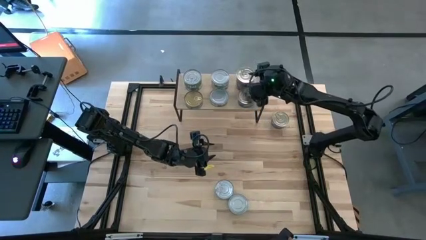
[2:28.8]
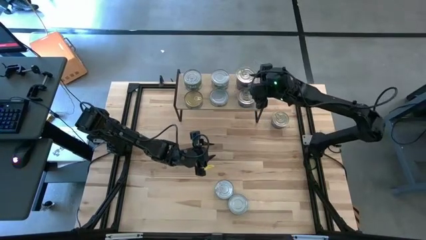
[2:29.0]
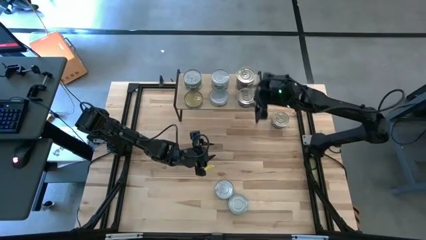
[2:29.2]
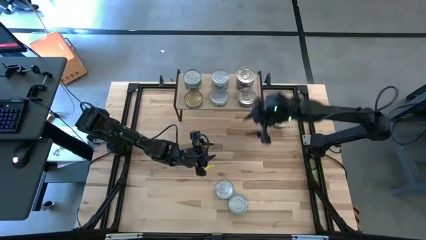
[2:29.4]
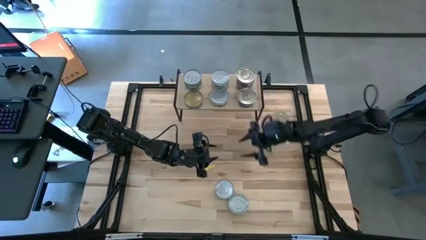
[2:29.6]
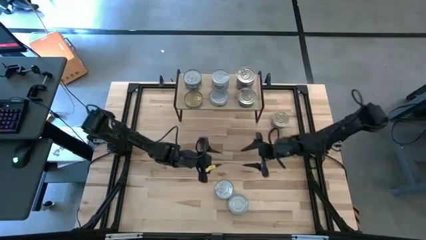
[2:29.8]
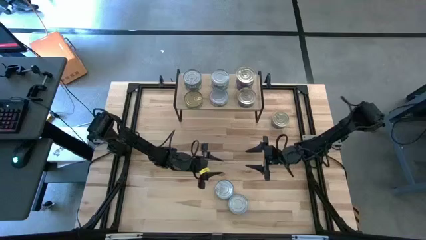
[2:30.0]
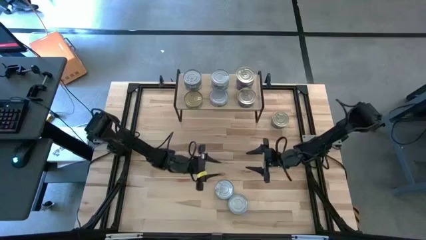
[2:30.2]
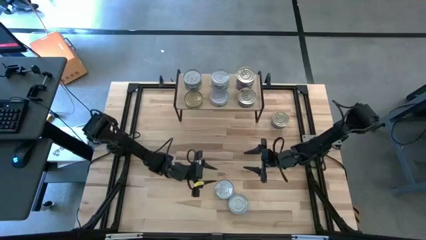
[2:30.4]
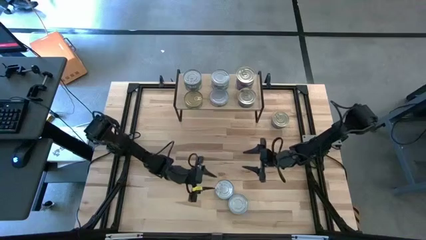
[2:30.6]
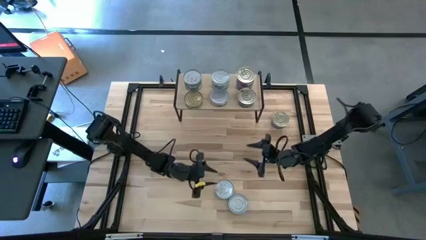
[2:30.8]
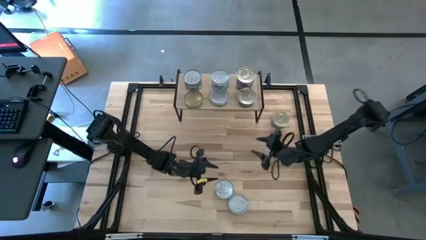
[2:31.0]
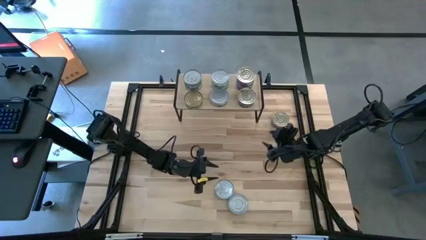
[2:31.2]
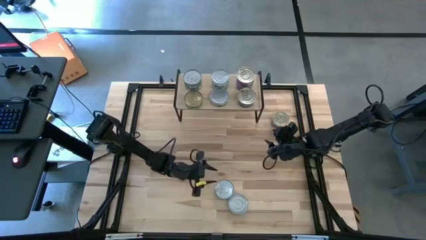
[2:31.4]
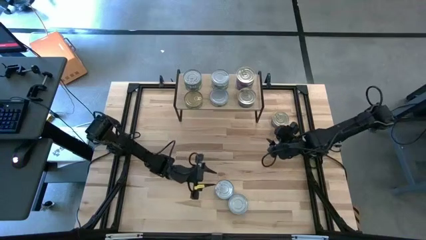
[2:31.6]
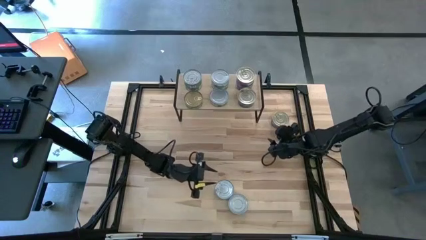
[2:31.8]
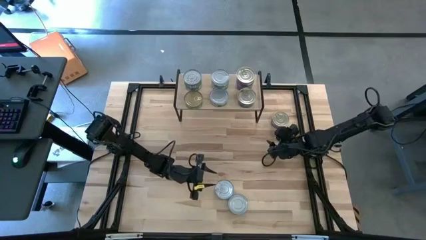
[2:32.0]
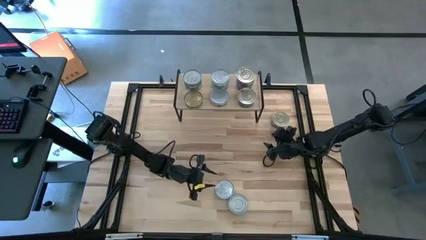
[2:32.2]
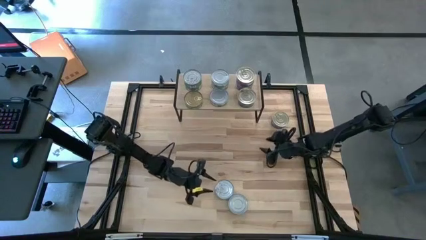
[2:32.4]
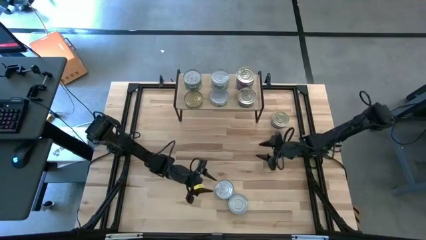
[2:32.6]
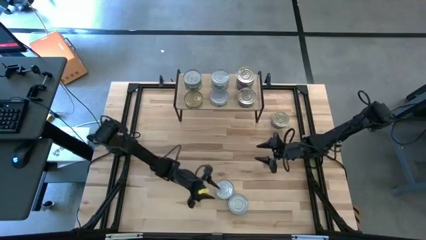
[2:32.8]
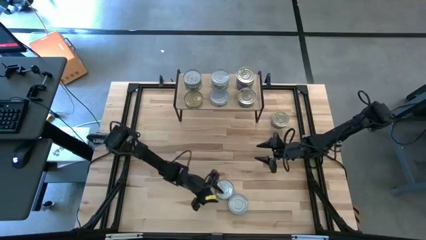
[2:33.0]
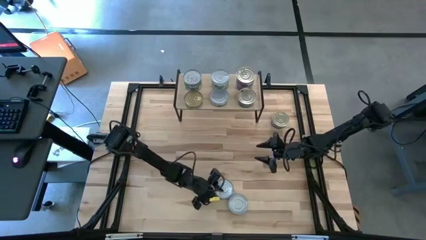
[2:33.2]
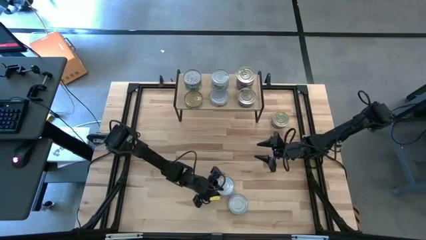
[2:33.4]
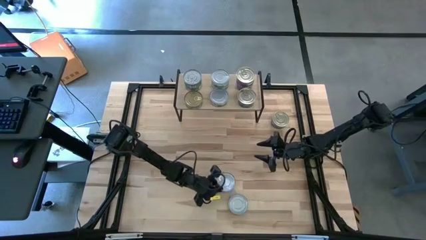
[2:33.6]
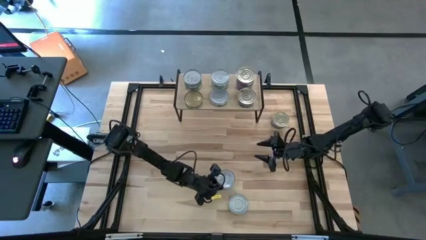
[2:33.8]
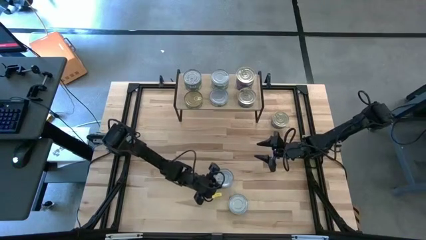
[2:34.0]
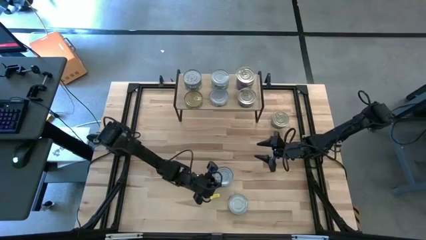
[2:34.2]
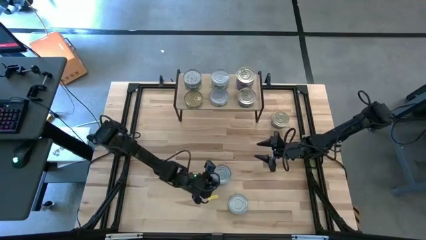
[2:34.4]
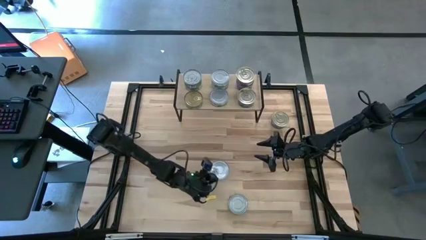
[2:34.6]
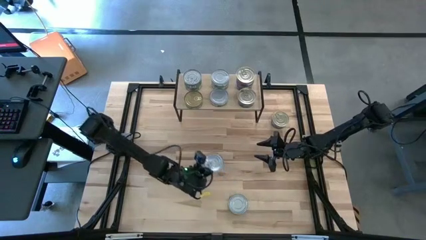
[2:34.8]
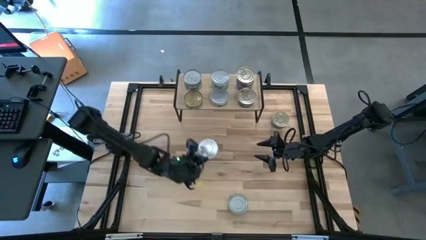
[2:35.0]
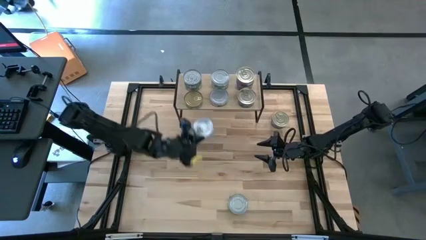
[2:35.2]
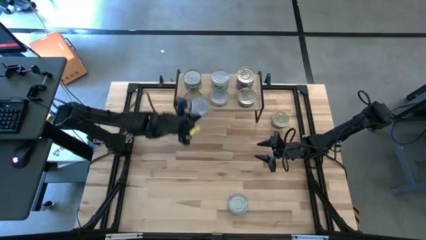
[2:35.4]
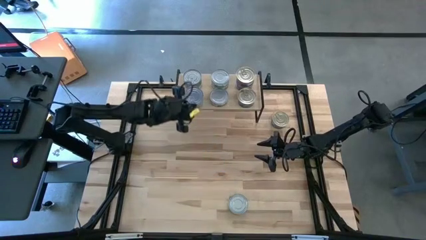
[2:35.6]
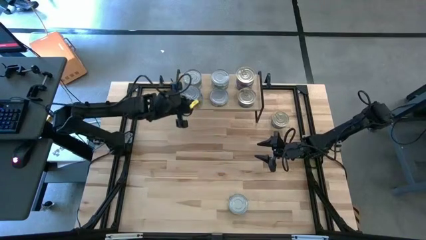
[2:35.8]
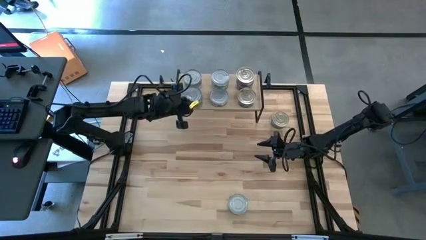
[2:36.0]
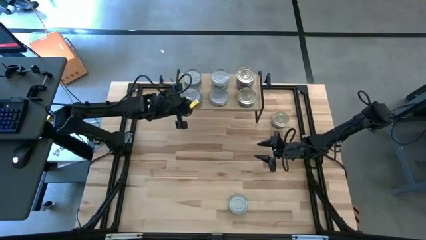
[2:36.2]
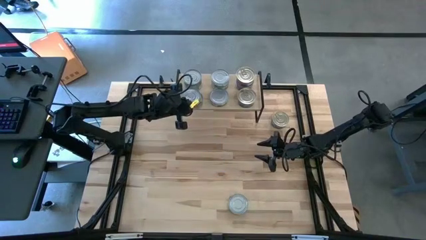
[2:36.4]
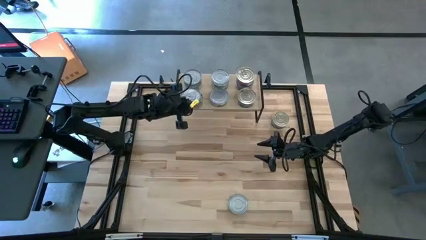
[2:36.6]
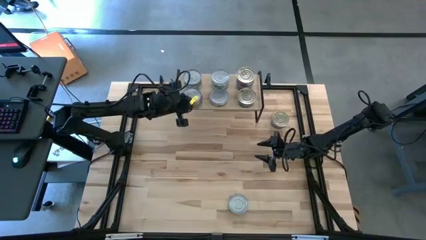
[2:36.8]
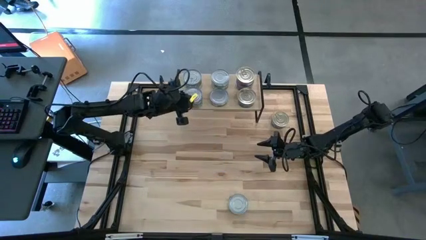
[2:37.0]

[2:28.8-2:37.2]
Task: Stack canned seafood by type on shelf
Stack the green tuna can on top of the bottom green tuna can on the shelf

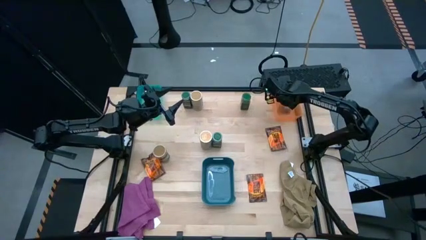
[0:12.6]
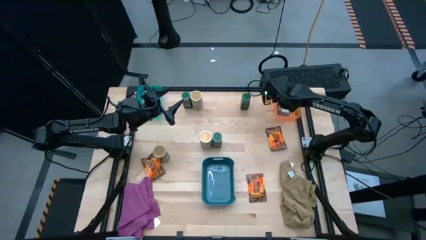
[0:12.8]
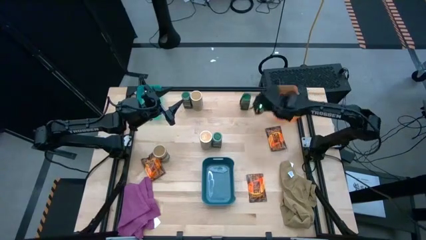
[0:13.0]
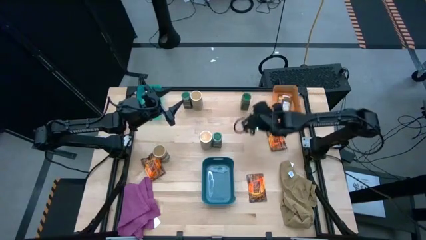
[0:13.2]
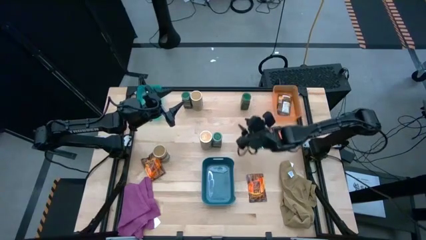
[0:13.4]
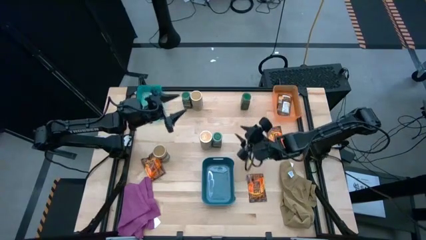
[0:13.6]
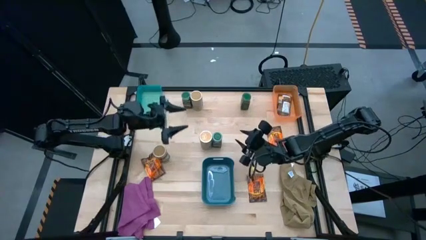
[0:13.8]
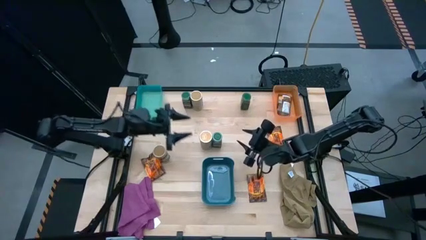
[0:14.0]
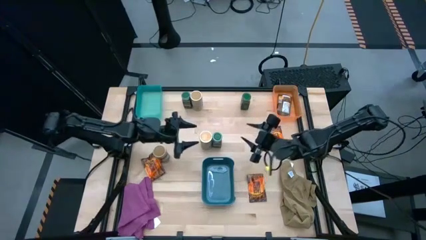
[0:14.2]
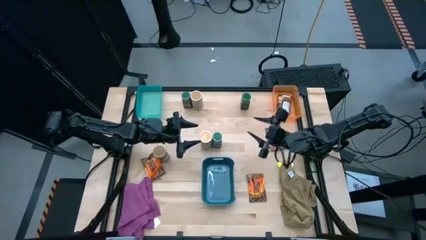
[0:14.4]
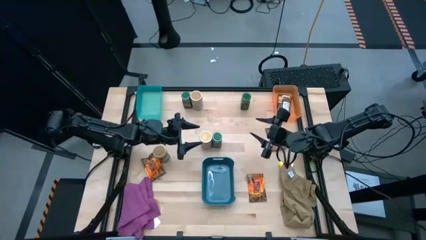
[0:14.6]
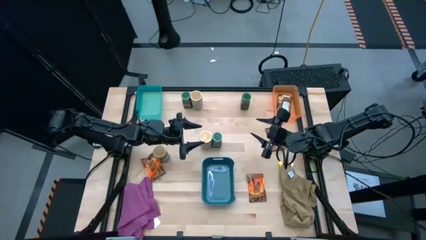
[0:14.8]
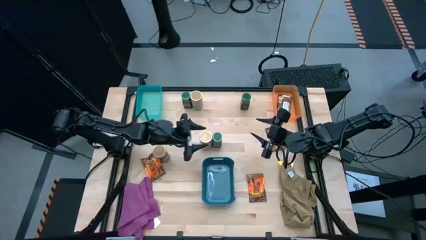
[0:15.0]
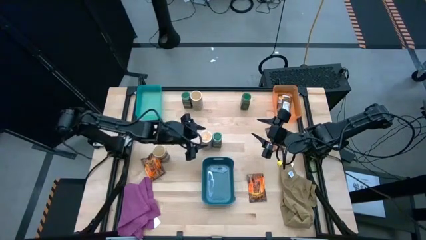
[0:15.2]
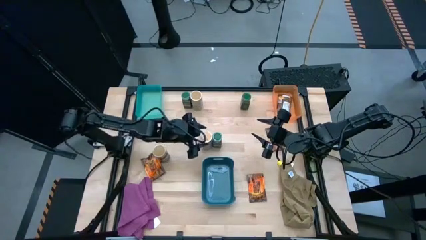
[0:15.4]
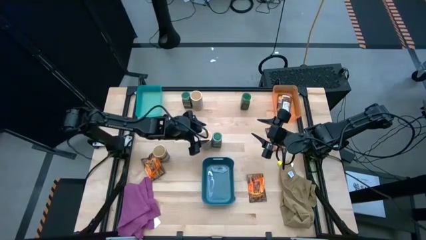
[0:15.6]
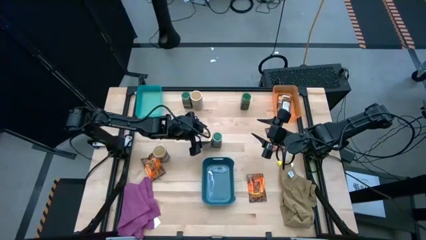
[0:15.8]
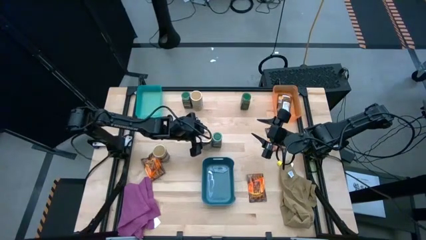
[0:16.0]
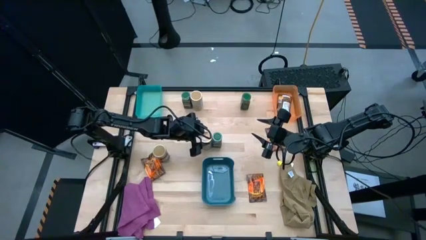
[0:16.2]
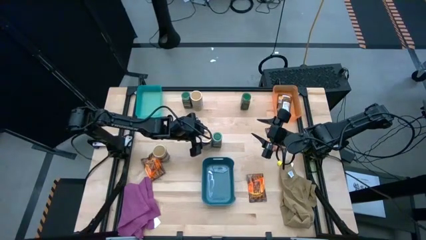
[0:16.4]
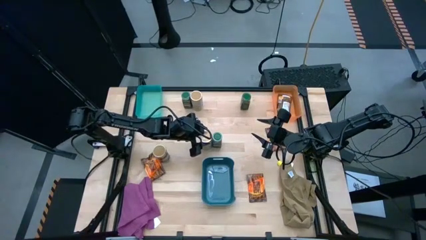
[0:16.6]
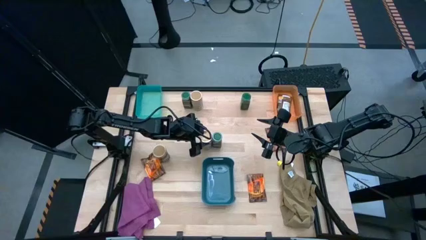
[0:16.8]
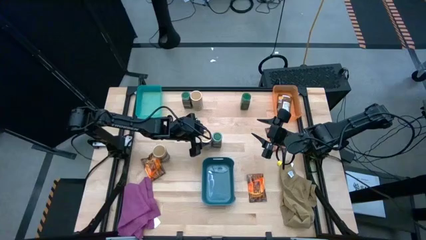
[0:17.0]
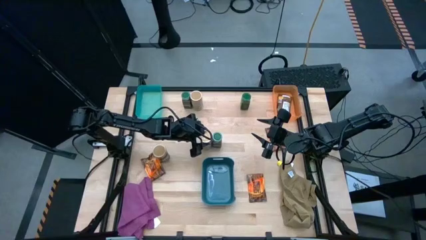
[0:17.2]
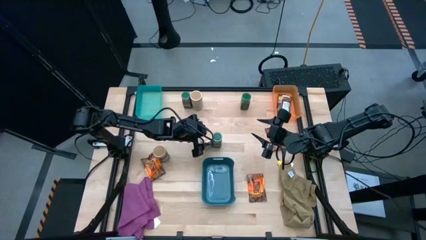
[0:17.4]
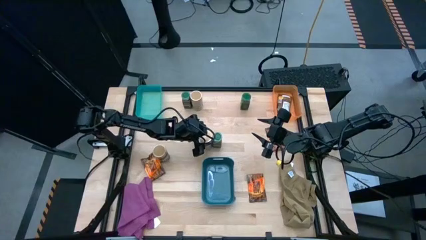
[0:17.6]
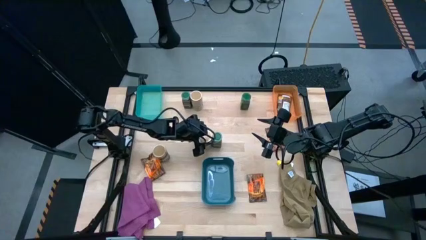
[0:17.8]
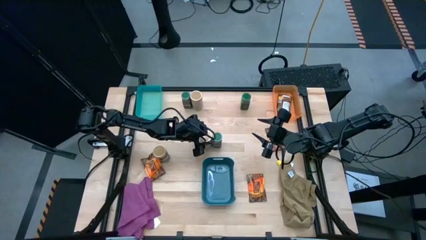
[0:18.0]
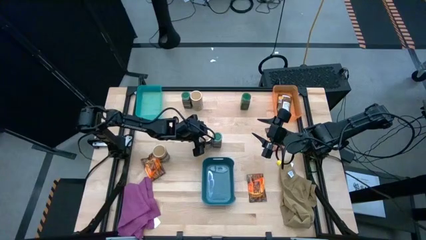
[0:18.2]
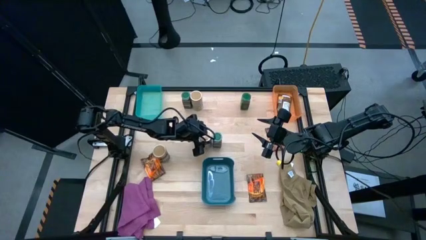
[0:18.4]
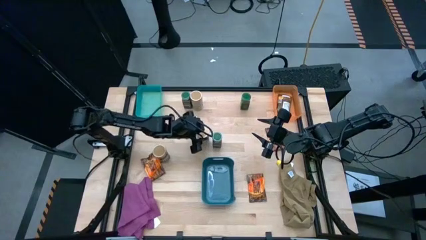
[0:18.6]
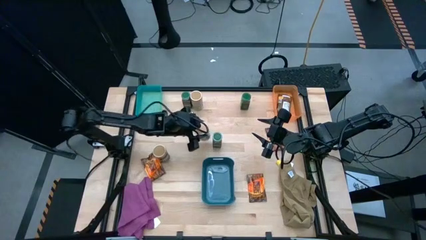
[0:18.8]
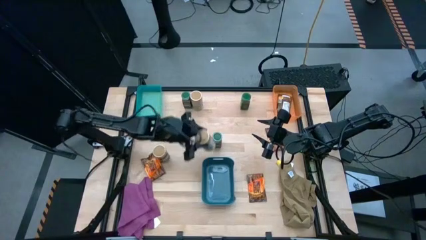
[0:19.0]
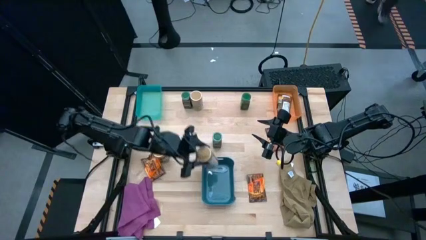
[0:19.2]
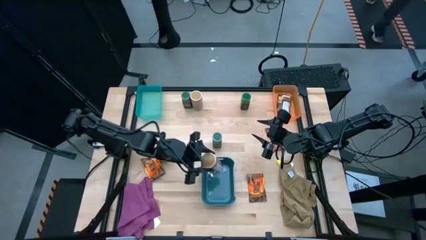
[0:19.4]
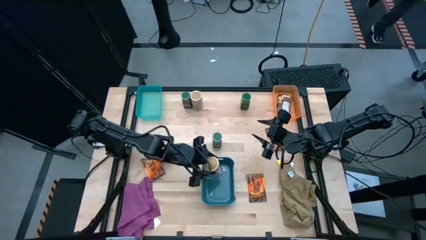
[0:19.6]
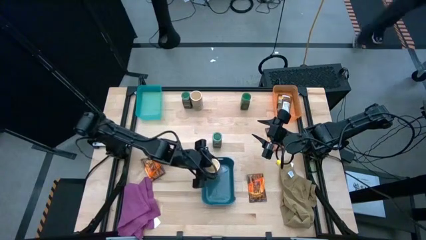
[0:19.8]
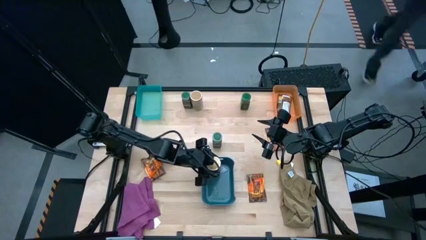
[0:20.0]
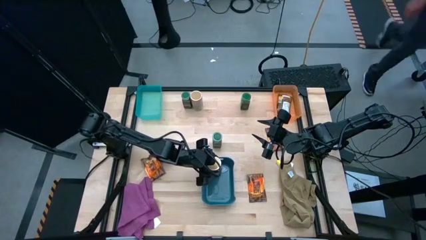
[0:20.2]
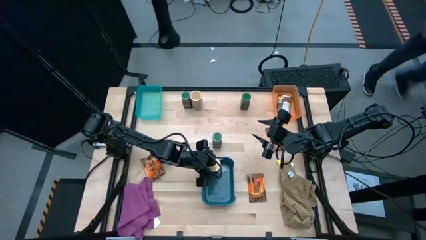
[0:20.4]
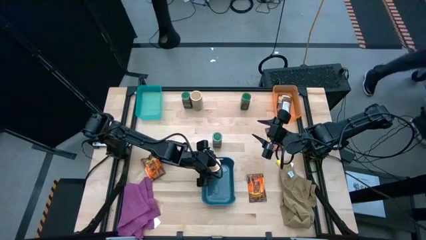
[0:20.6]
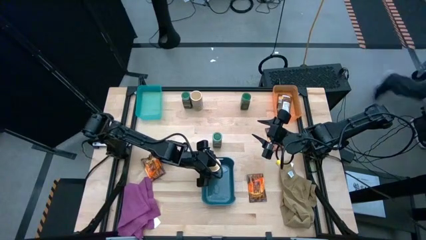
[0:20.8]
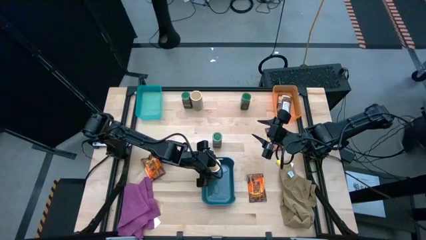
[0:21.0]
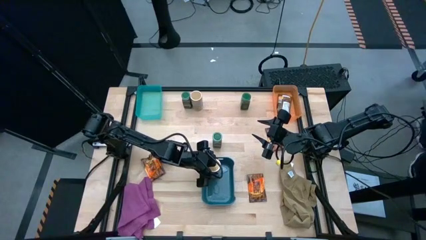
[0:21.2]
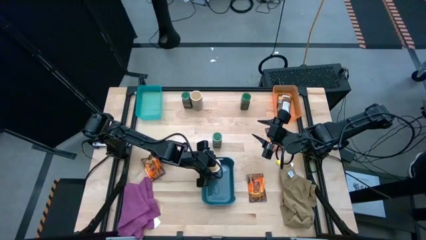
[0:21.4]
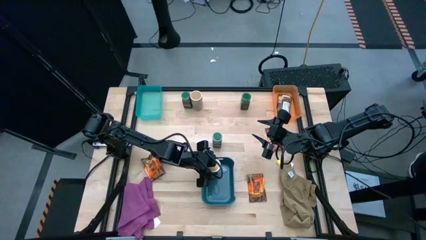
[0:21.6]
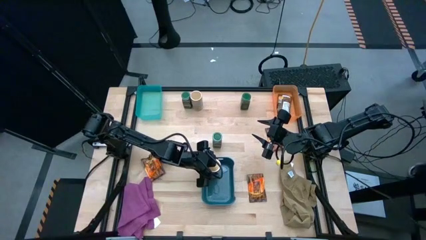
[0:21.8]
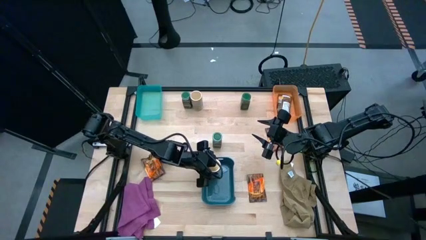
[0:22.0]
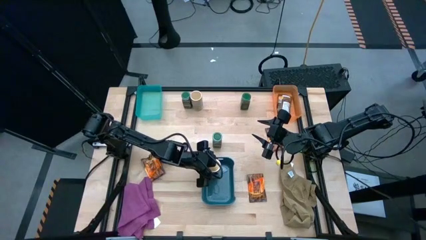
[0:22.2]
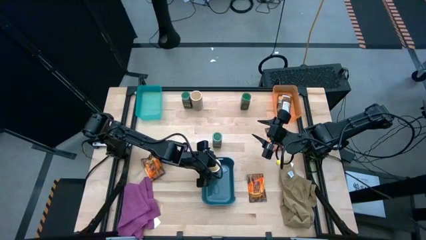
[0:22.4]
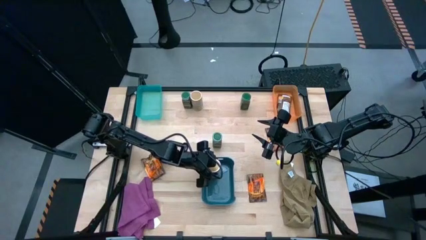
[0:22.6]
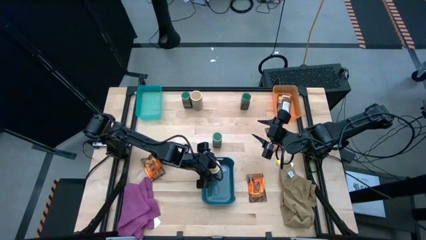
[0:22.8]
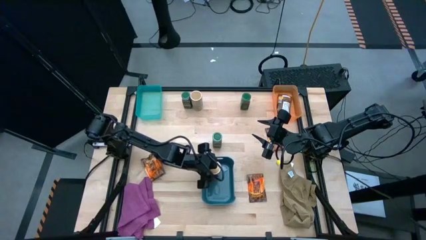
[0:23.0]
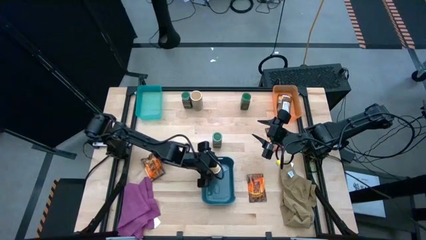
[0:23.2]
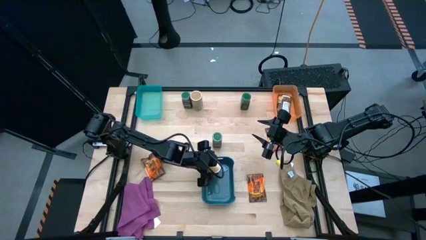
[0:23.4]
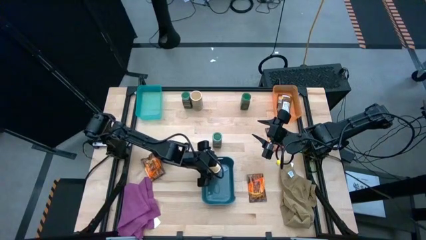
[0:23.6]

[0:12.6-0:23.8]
Task: Sort spices by type
Put the gold seasoning bottle into the blue bin
